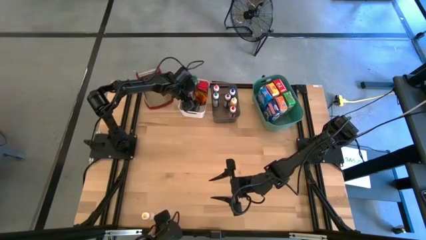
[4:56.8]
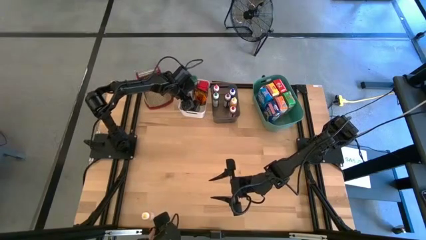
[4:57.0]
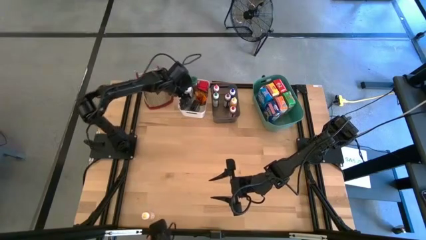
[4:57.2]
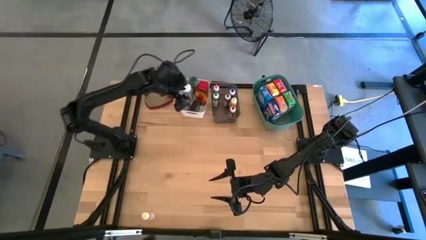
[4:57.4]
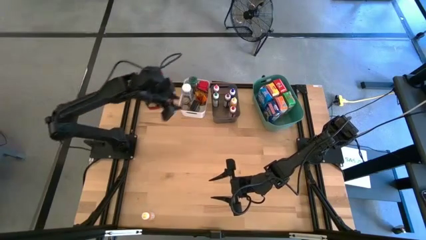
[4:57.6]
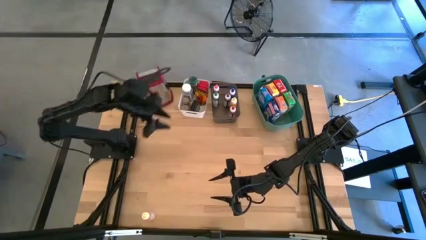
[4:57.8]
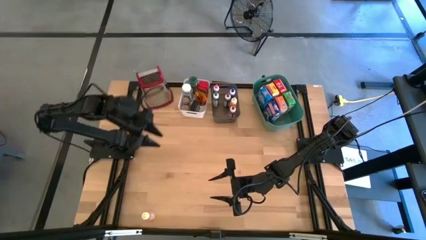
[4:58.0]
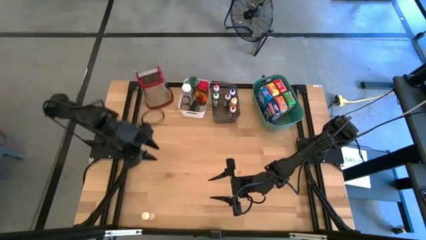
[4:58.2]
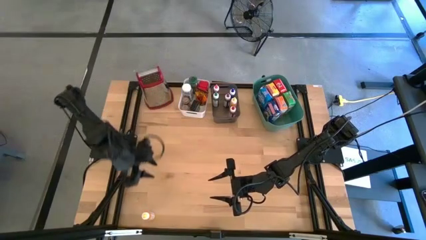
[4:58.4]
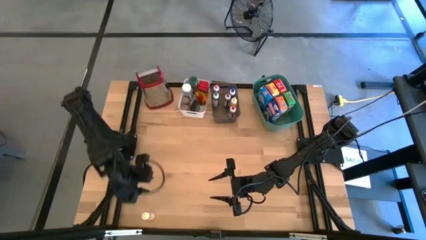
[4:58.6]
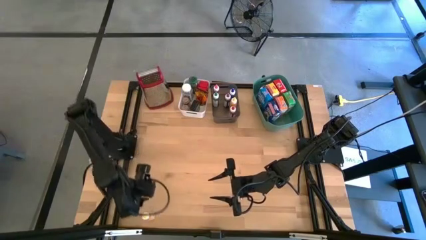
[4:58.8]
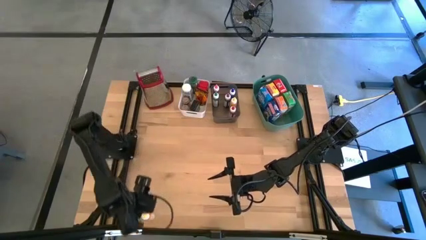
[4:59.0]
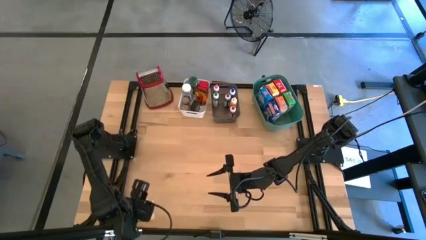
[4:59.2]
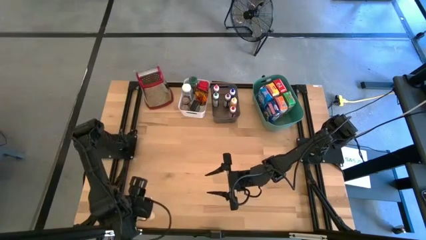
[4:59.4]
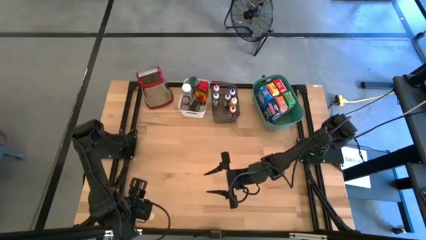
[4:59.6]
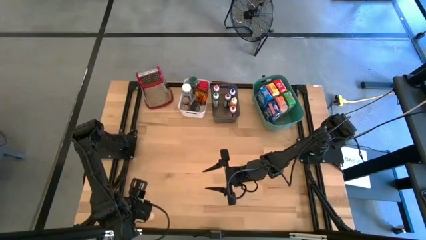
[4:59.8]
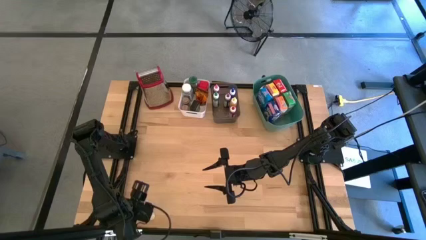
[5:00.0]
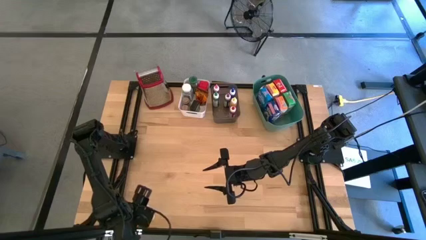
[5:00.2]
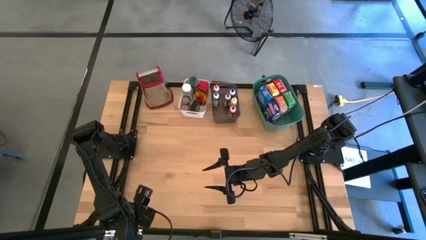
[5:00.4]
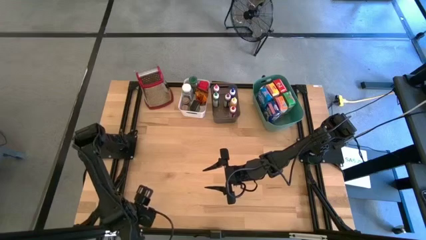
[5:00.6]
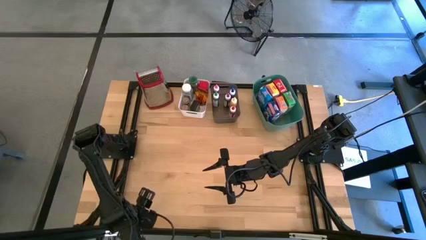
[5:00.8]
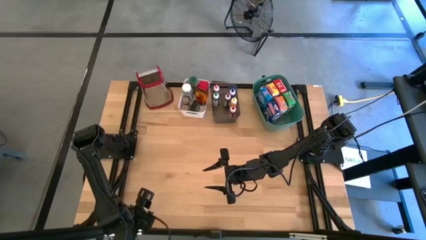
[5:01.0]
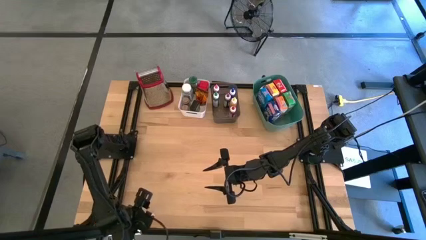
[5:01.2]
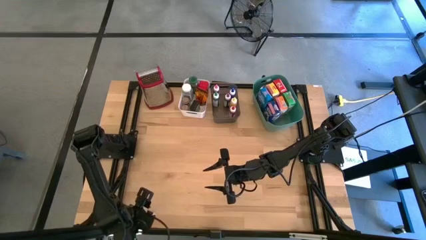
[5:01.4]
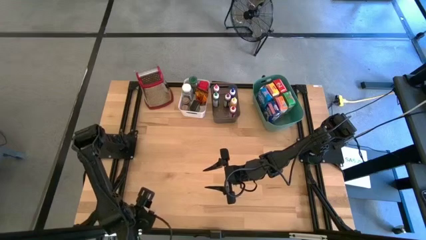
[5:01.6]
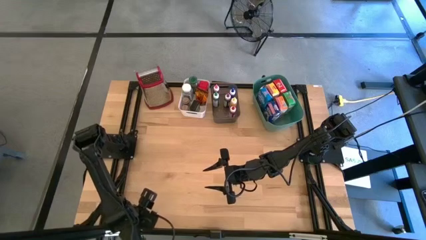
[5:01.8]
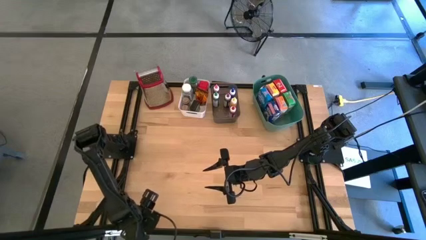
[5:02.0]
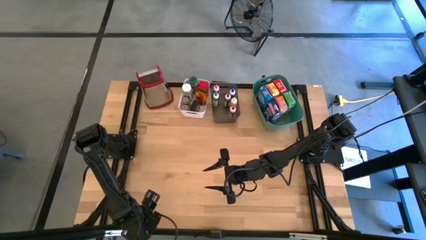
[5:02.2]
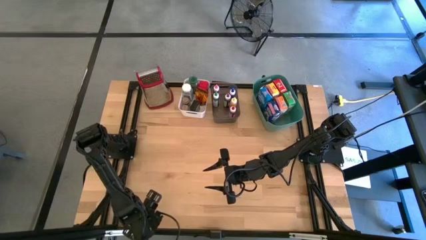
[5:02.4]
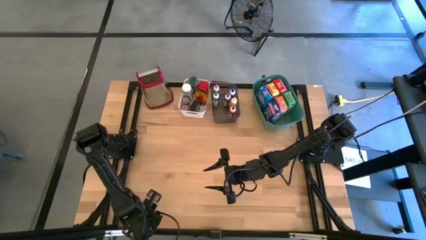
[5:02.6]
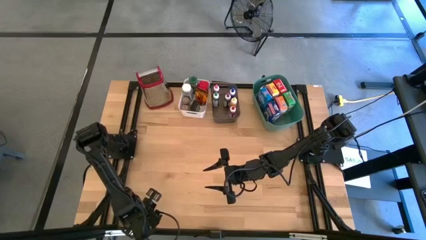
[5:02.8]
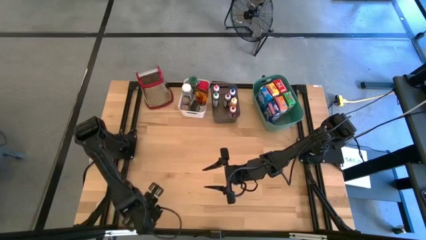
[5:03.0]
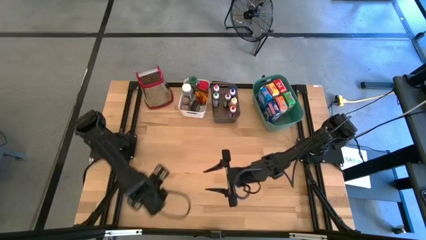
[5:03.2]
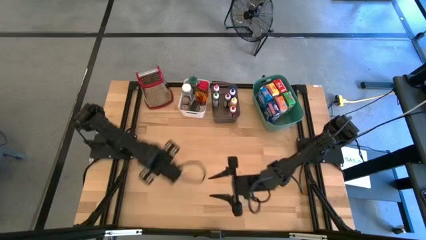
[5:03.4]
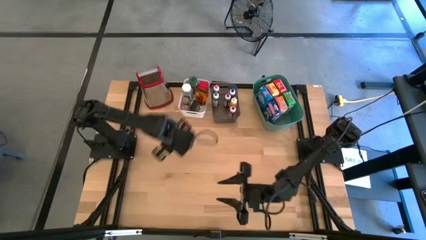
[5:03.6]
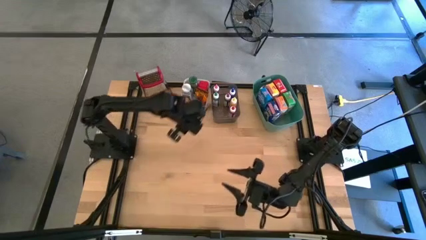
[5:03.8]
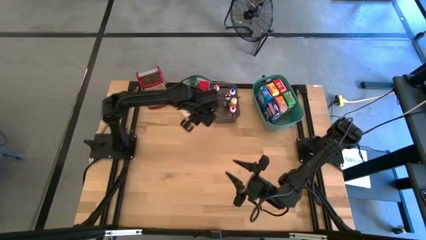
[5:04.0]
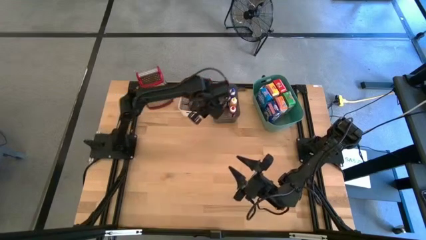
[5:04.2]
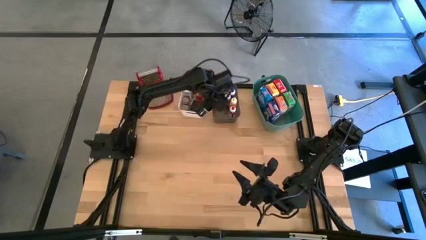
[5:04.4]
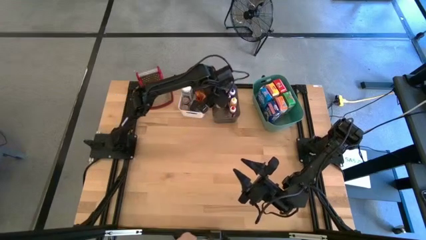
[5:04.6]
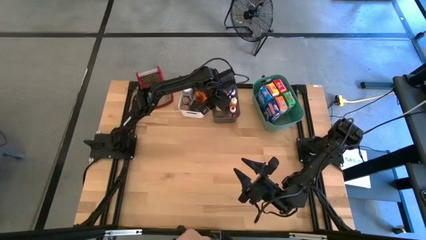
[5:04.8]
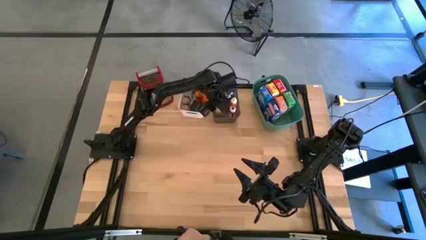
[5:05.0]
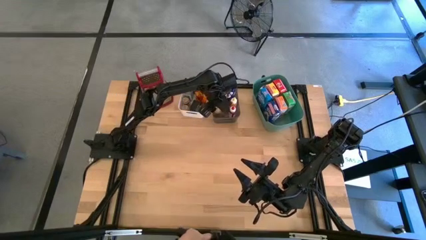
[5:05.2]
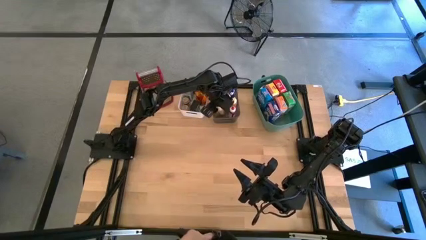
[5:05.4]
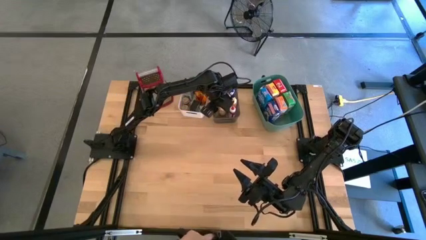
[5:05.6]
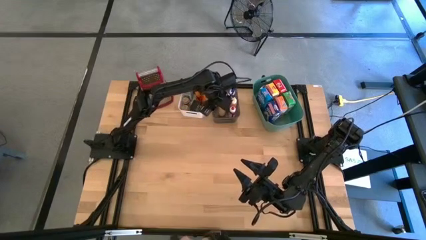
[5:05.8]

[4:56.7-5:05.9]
Task: Pick & Place Kitchen Items
Put the yellow food coloring bottle into the black bin

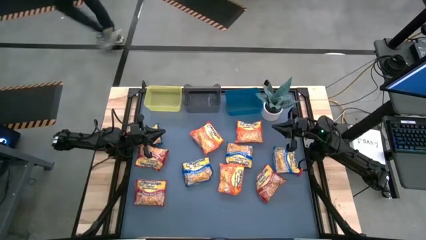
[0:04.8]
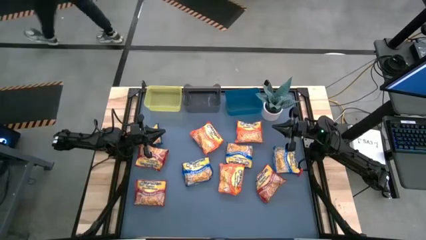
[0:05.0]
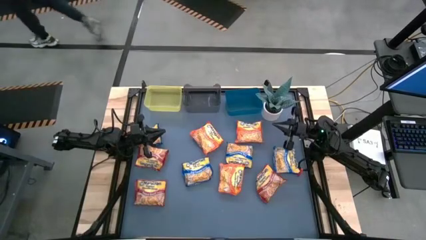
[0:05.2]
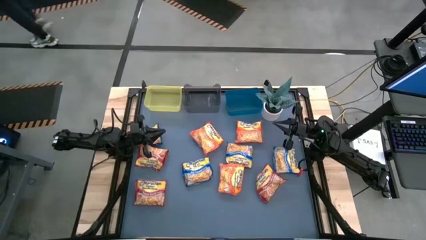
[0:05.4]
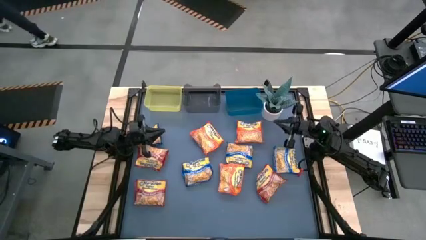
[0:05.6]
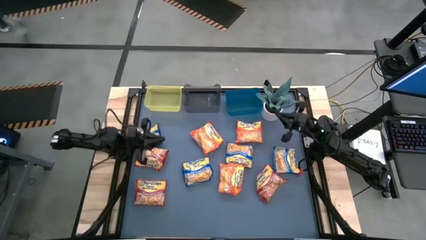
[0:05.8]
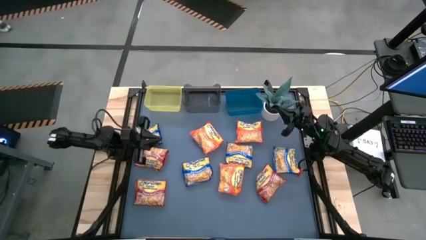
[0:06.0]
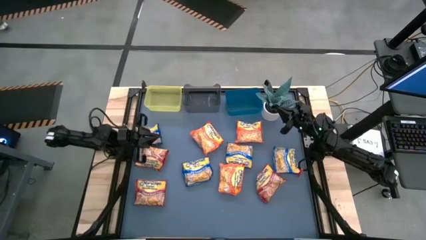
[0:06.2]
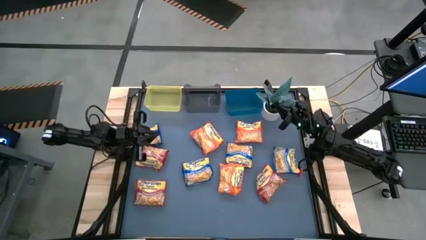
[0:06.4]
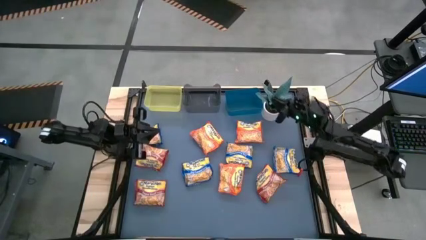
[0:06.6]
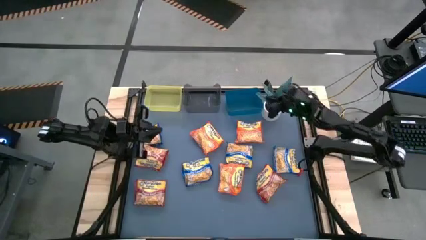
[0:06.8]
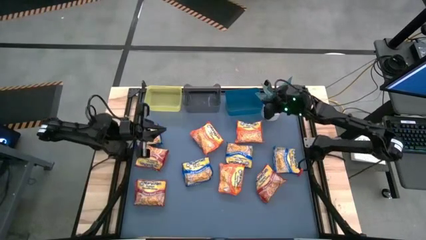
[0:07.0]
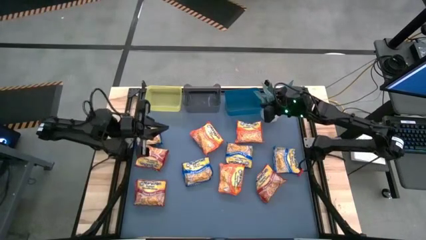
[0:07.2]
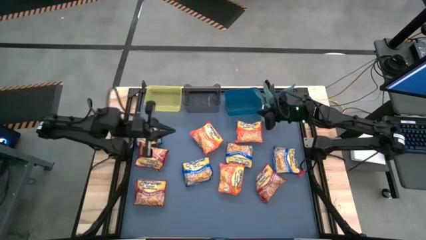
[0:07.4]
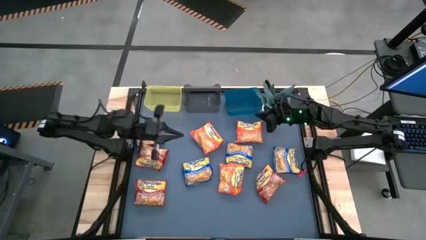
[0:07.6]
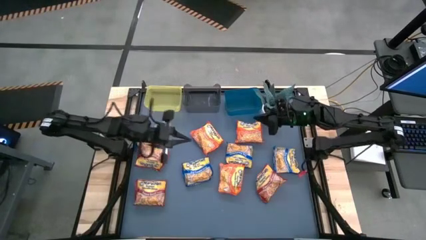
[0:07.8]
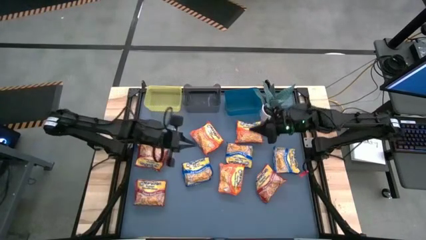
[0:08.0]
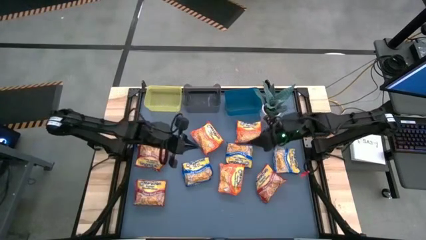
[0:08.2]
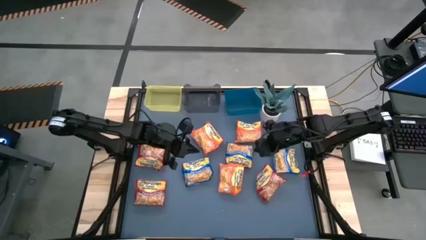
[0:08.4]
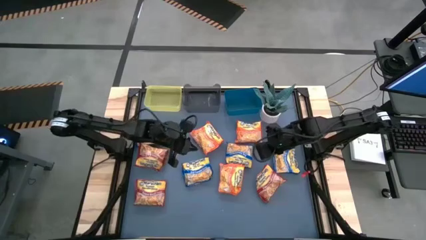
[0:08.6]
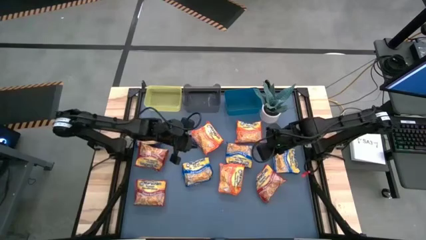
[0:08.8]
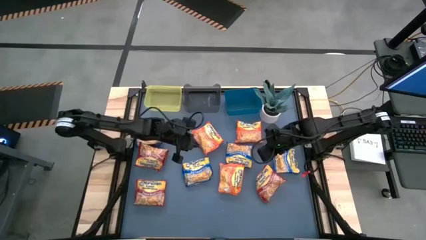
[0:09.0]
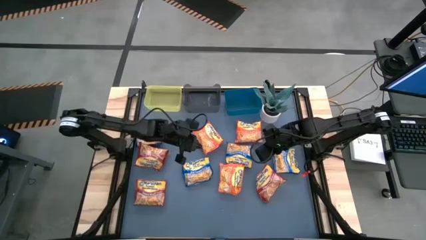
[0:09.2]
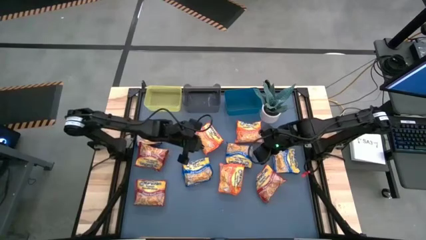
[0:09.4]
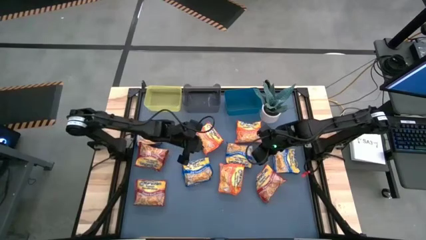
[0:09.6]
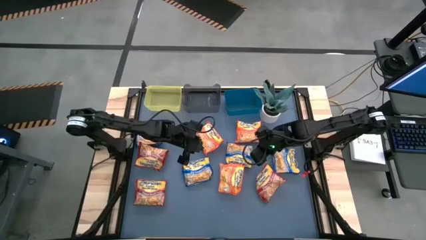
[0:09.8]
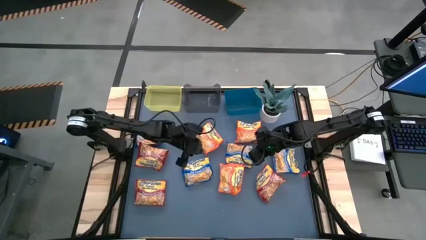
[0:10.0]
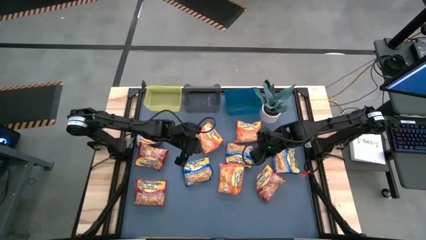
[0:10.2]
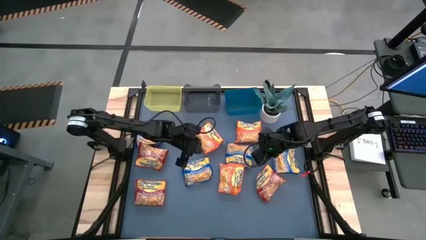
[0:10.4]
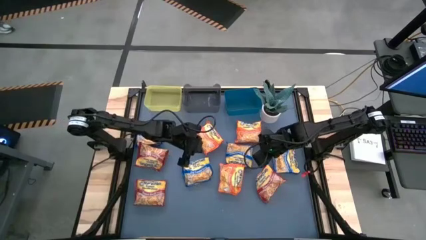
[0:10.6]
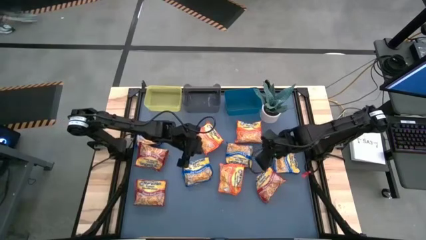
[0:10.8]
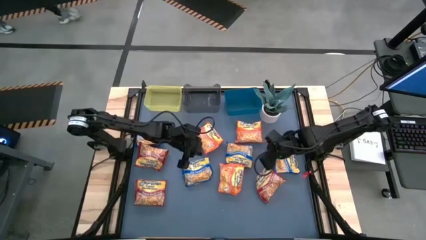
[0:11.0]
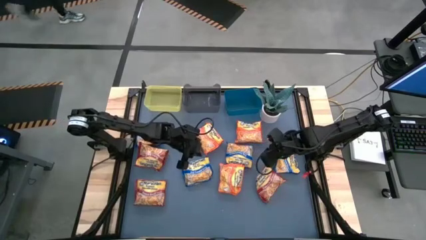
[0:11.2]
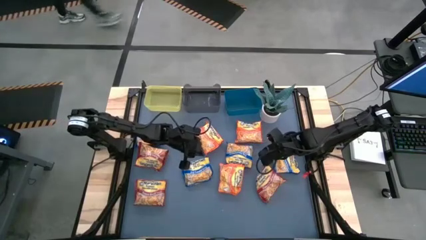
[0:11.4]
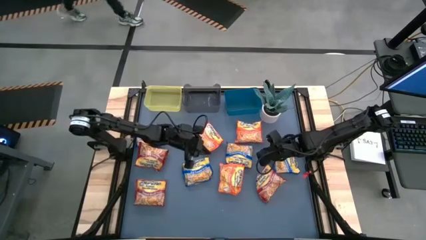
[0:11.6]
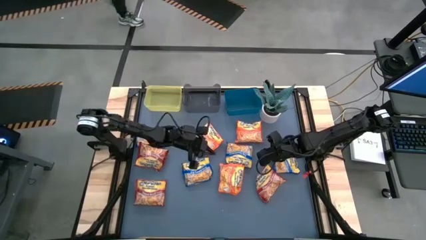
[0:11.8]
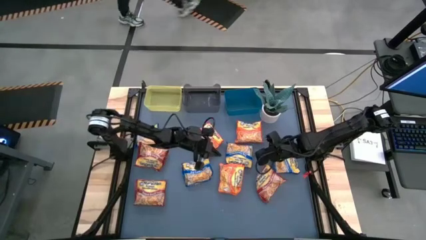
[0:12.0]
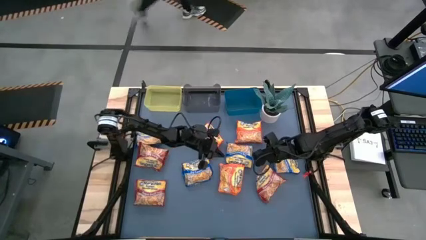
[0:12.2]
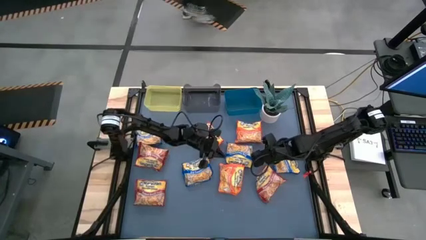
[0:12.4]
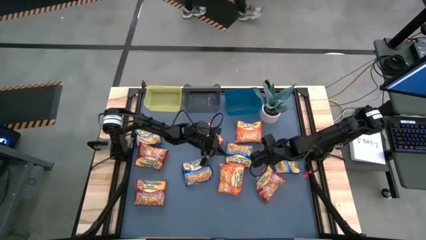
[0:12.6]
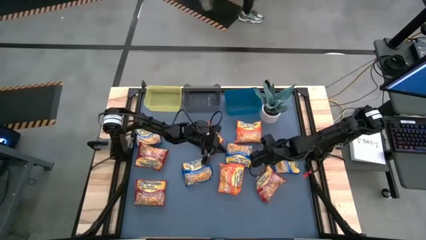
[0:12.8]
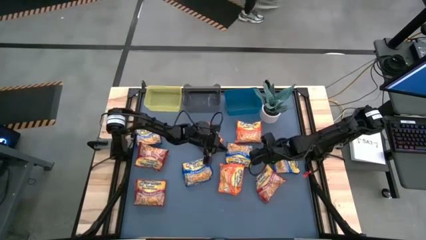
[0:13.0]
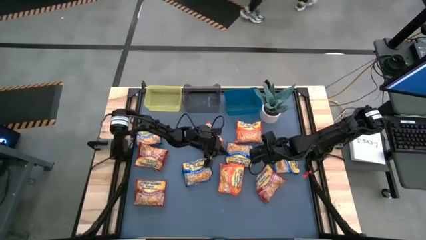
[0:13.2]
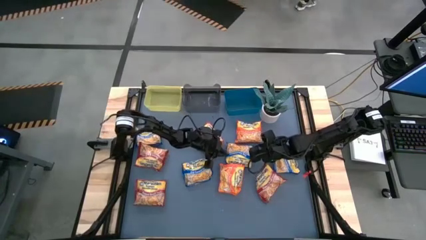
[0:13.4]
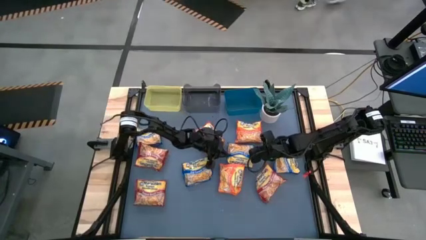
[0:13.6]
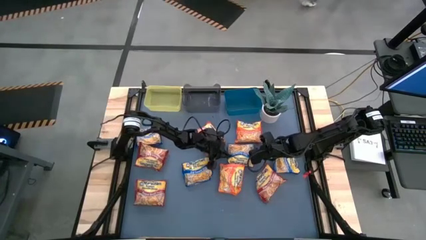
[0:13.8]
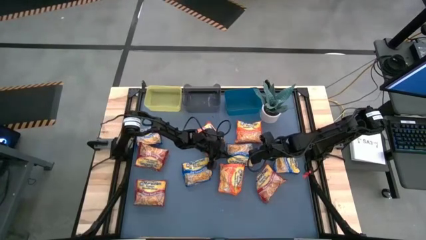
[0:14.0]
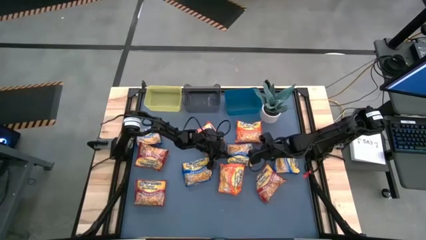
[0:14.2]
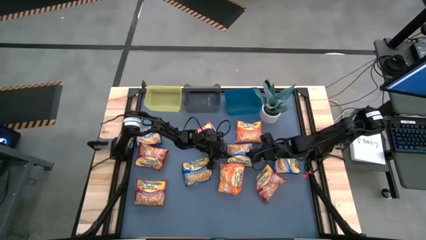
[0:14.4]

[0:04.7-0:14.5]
Task: Sort Maruchan noodles
Put the blue noodle pack into the black bin
